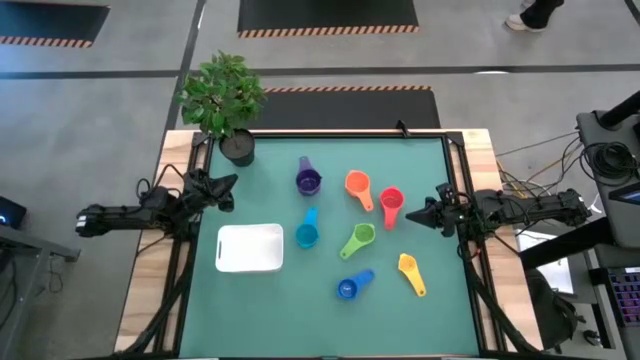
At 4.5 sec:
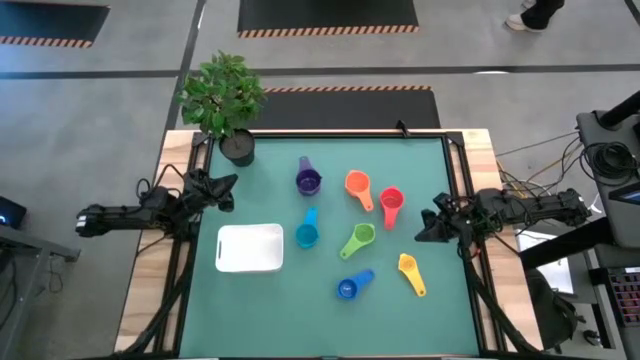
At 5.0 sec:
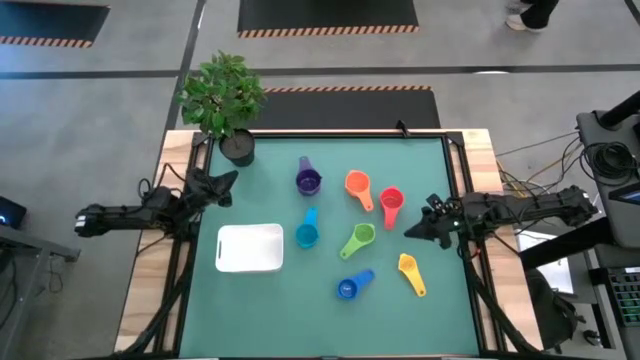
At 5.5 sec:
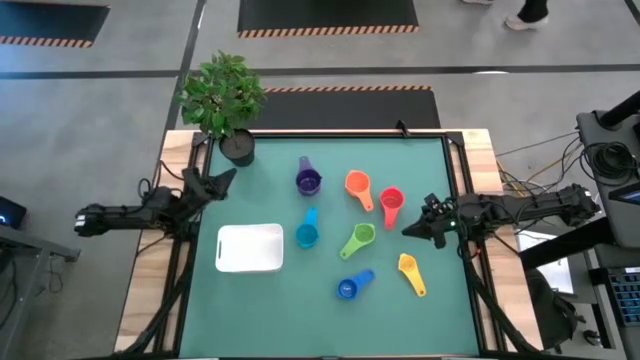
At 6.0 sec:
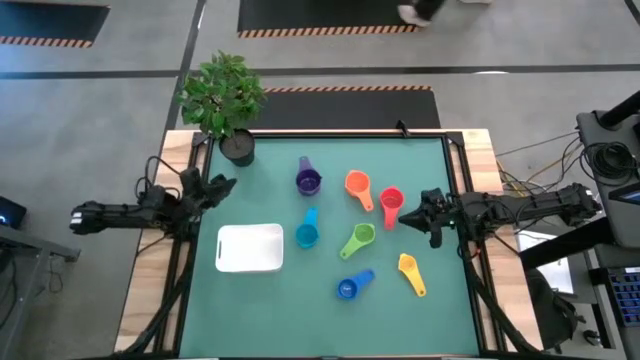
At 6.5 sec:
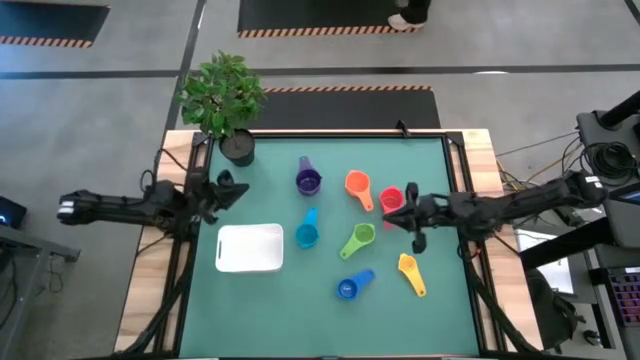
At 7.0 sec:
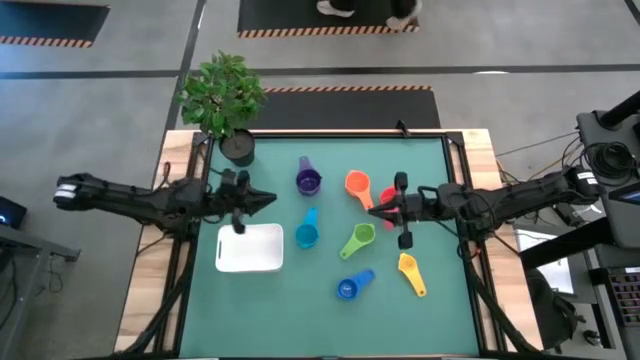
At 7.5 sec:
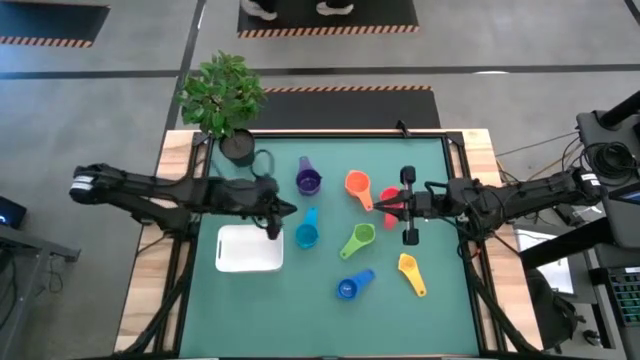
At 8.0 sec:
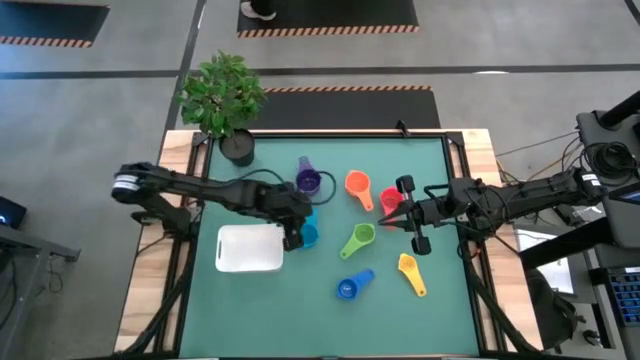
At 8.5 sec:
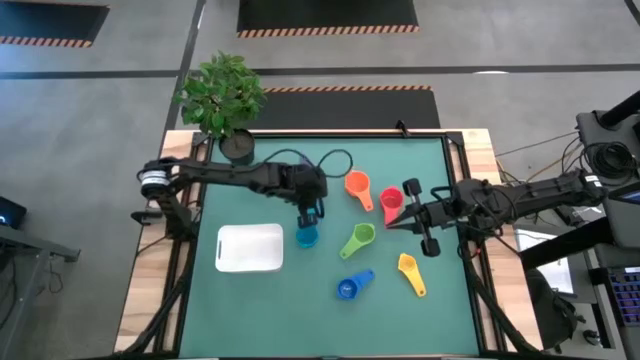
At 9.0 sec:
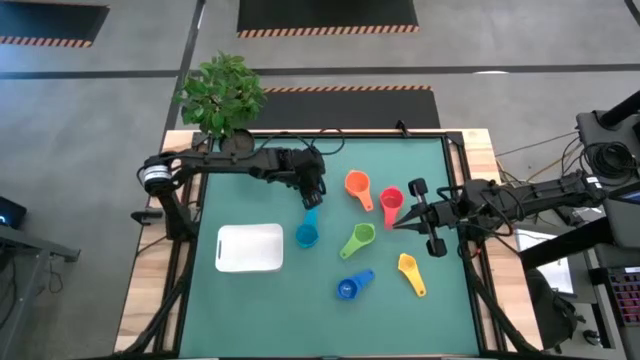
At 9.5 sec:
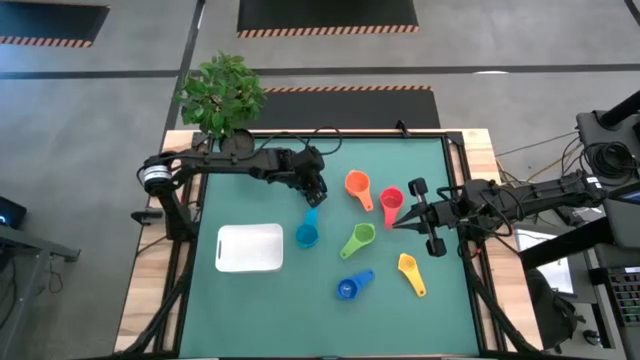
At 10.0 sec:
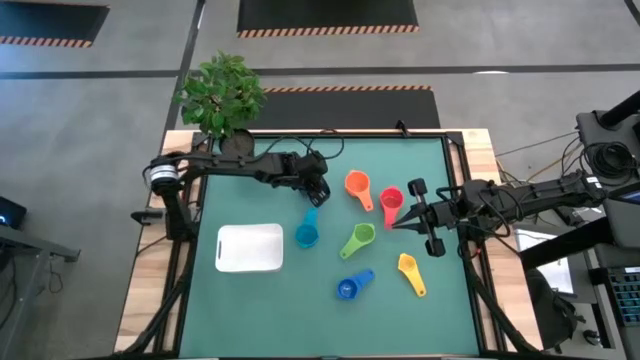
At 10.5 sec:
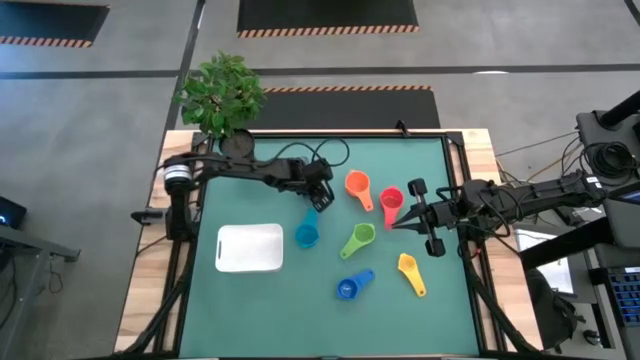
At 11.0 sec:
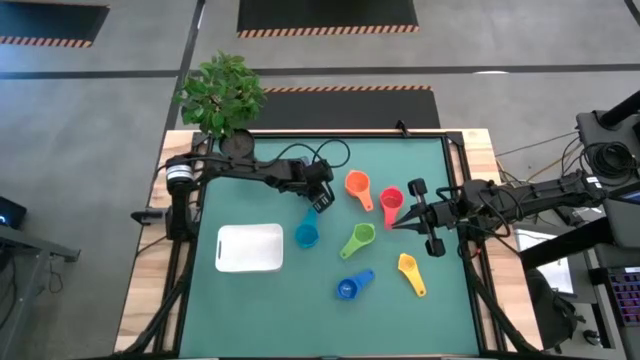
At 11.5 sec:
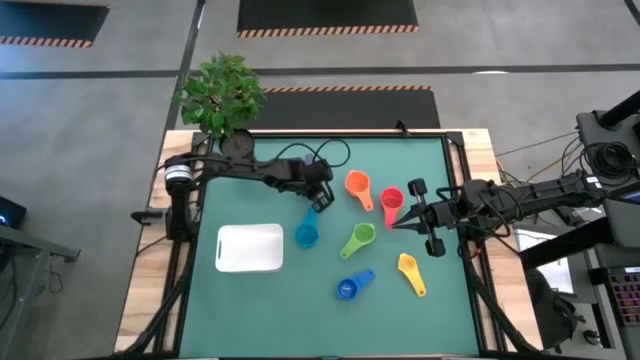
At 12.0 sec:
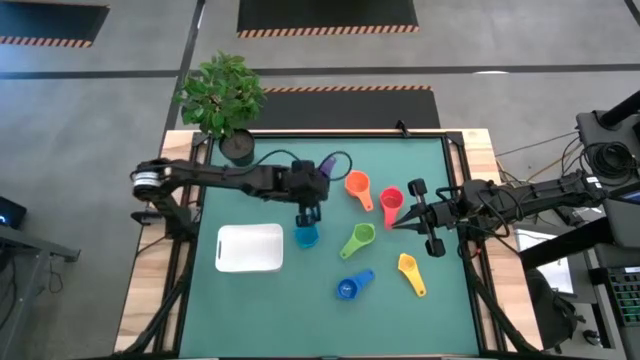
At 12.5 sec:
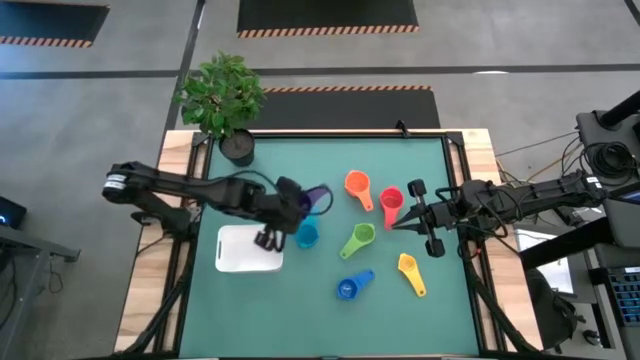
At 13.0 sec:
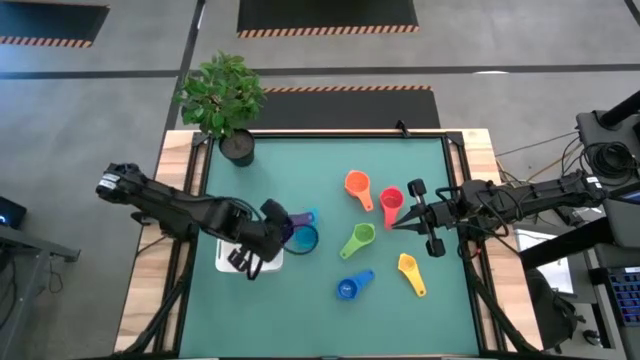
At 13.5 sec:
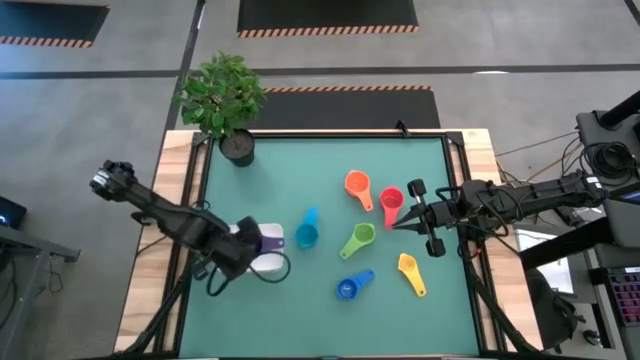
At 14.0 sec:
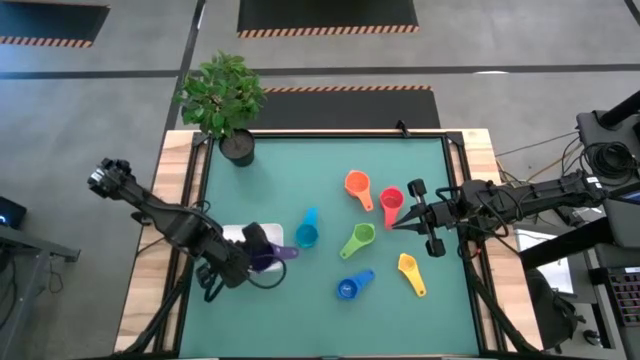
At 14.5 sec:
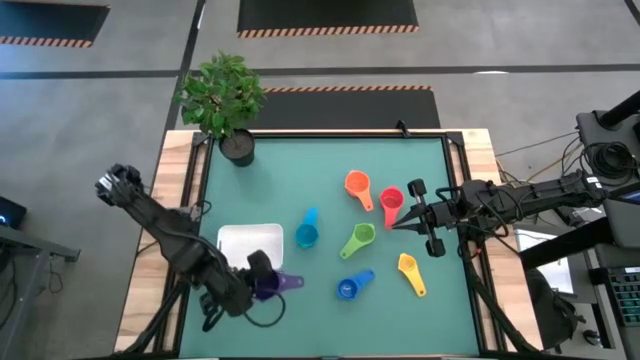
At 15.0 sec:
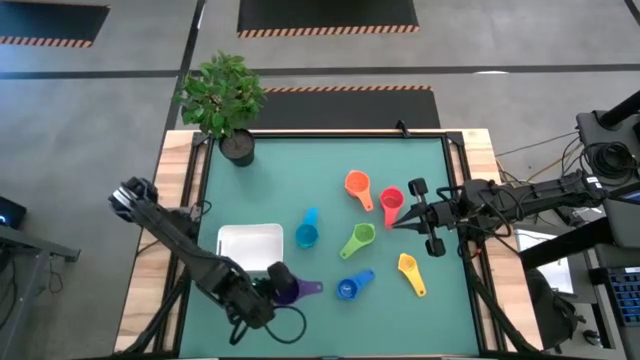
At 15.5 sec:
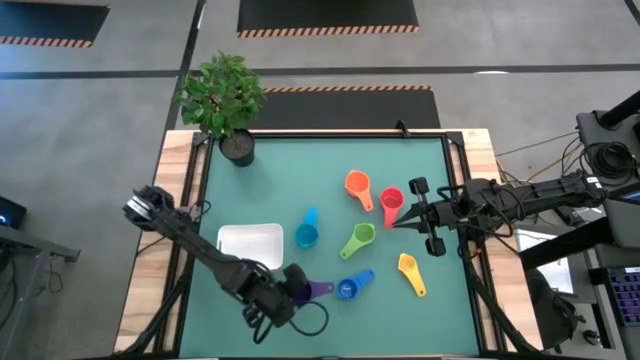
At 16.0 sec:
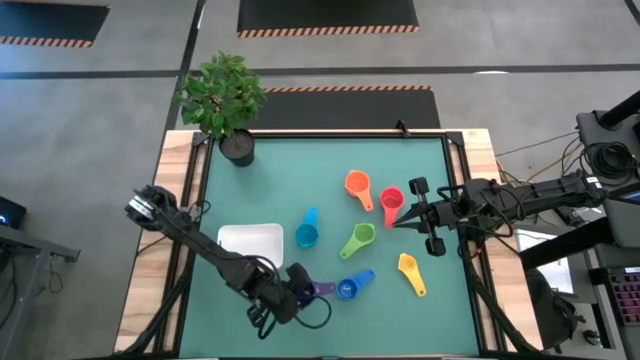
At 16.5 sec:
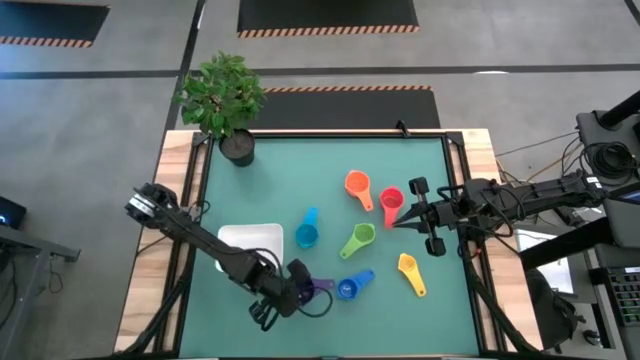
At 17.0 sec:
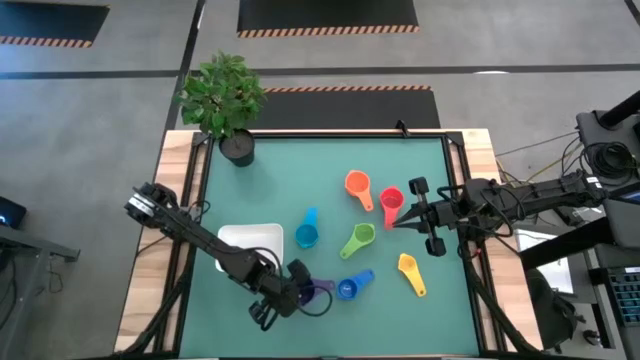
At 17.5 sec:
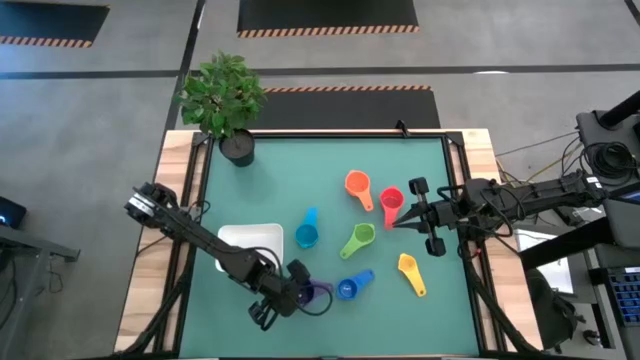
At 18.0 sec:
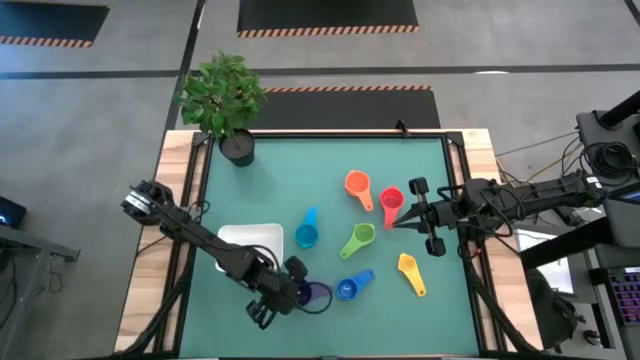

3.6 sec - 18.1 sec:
Task: Nest measuring cups in basket
Prepare the purple measuring cup
